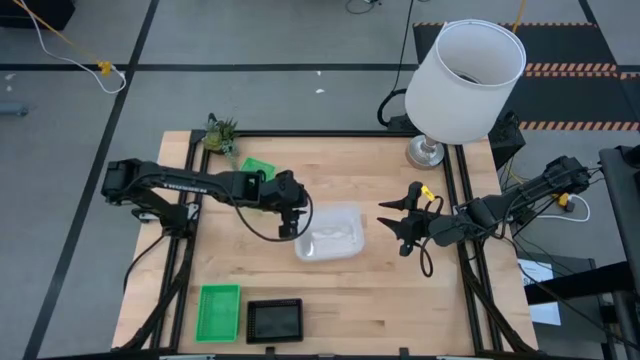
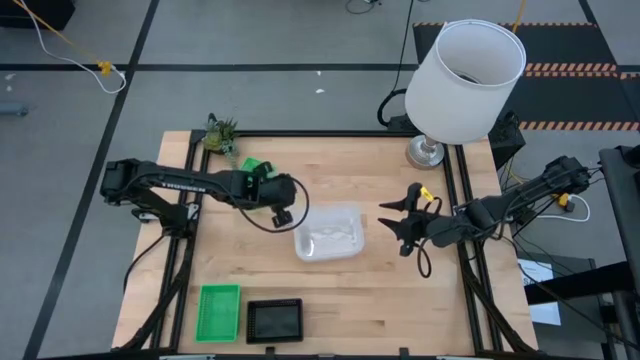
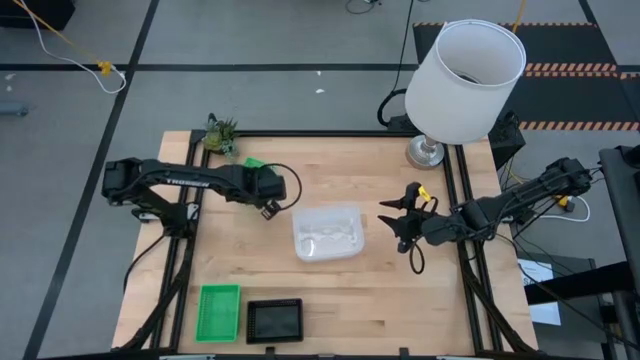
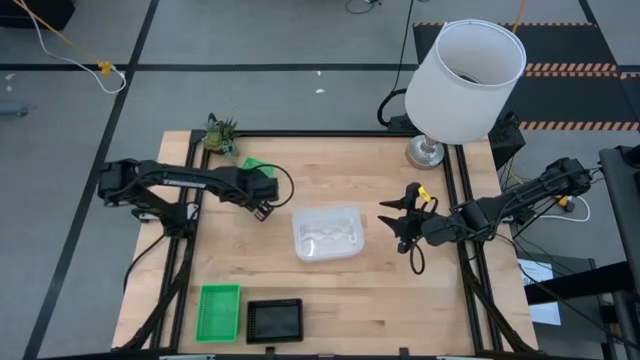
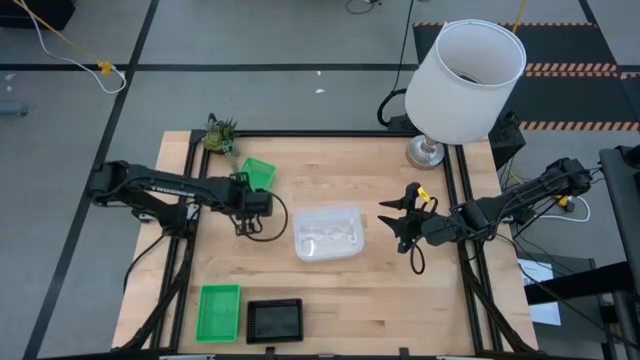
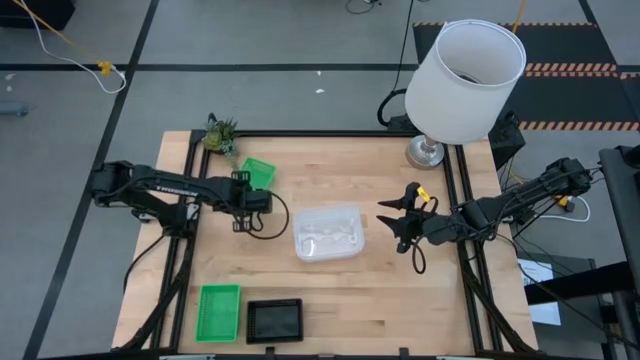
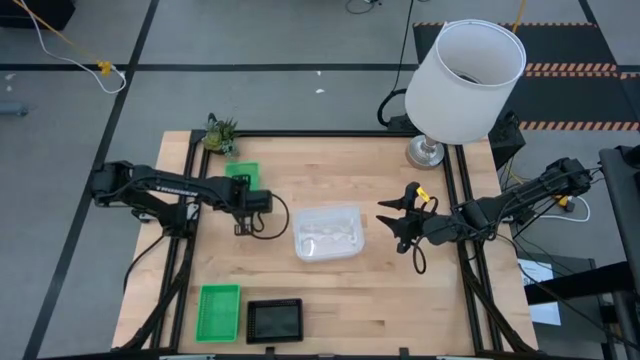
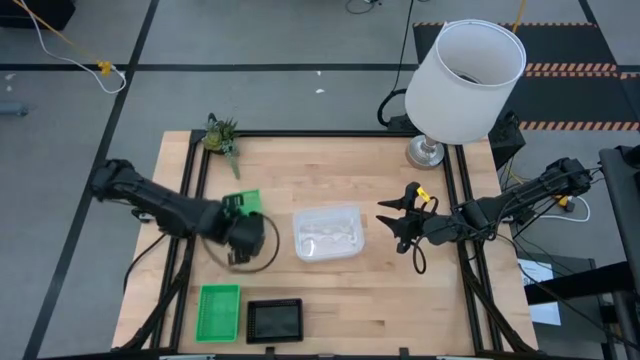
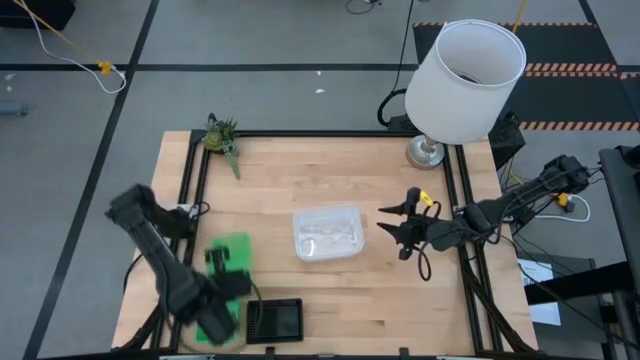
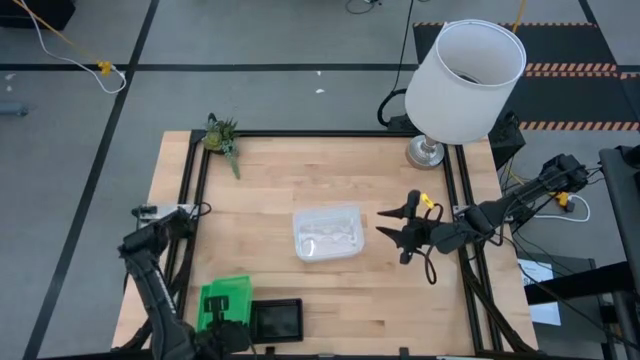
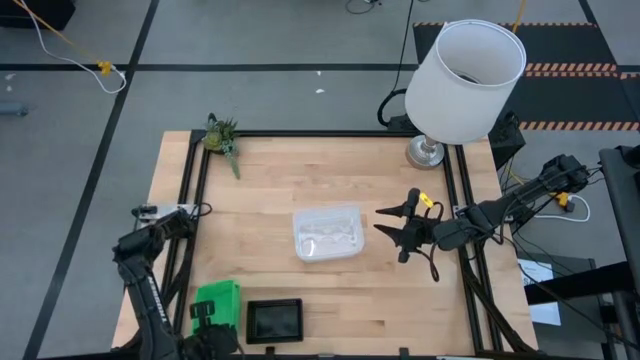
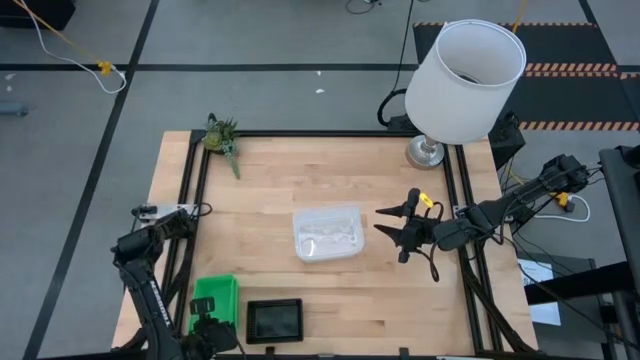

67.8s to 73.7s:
Stack the top green bin on the bottom stacked green bins

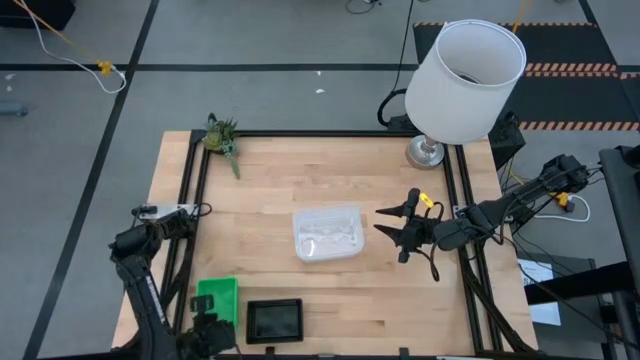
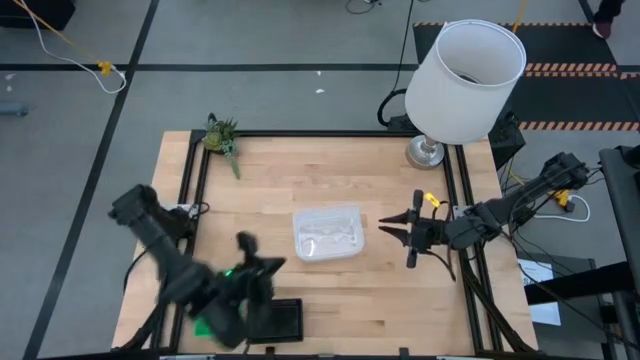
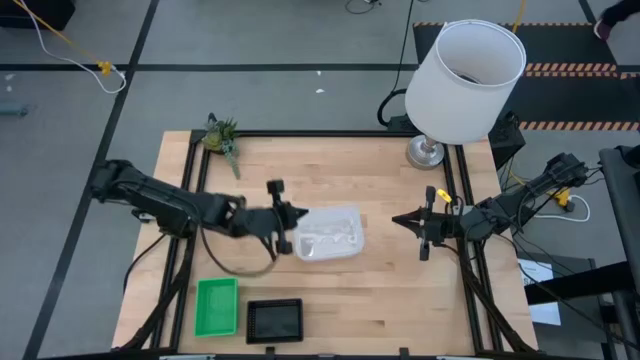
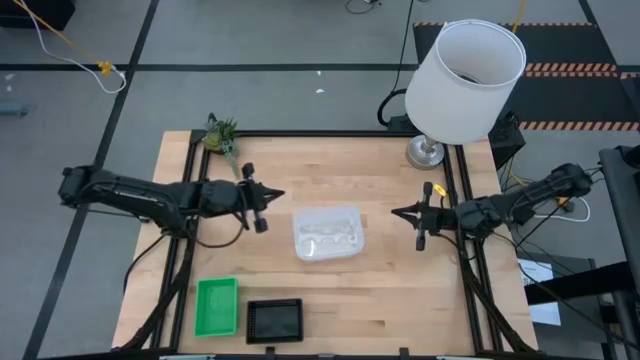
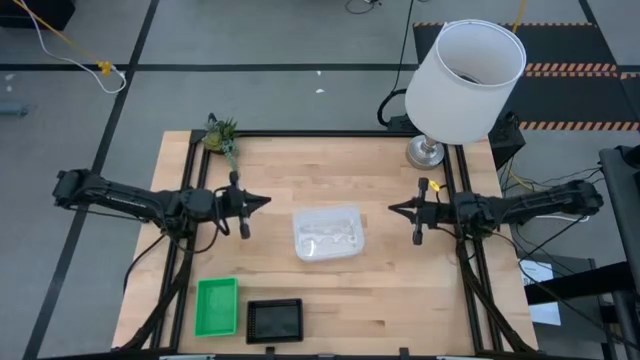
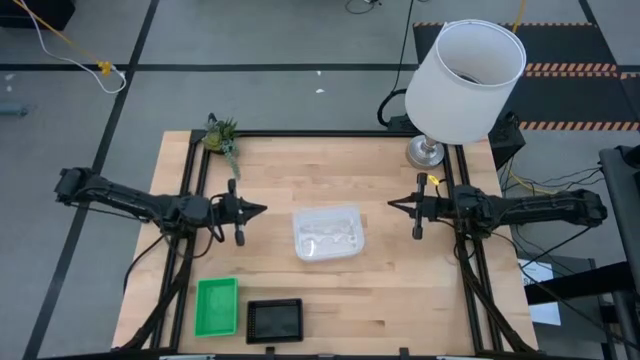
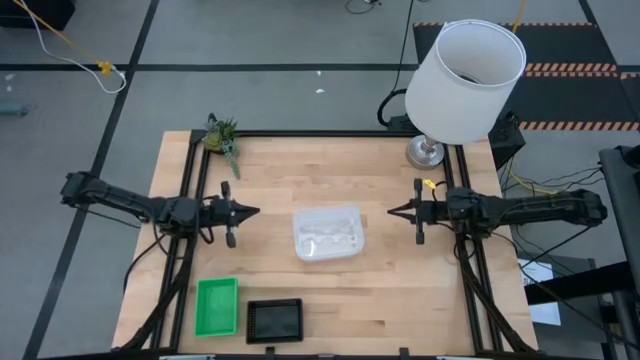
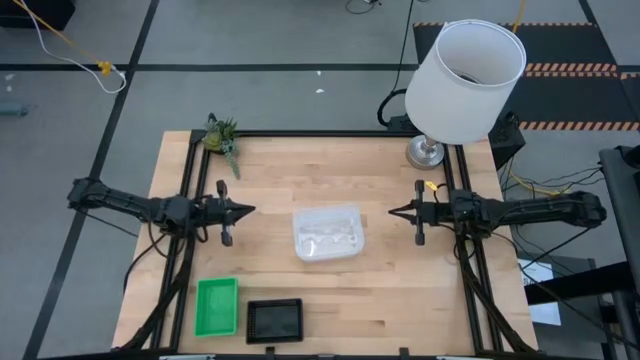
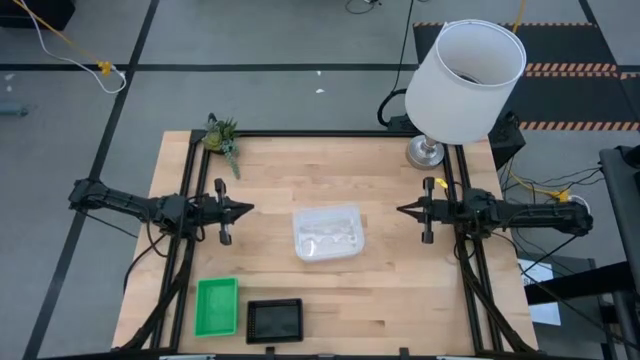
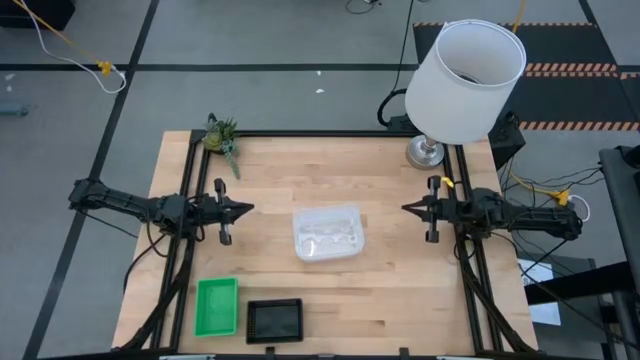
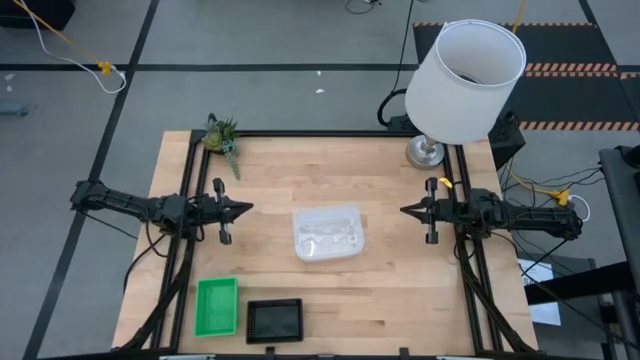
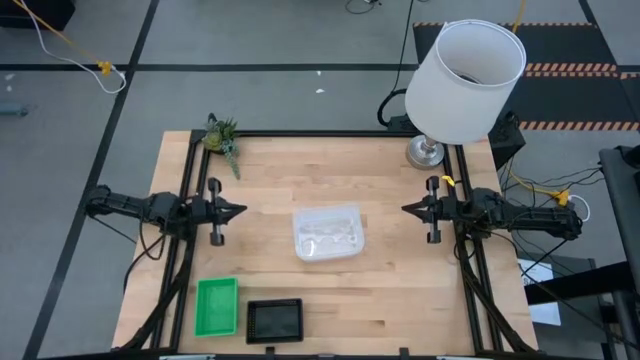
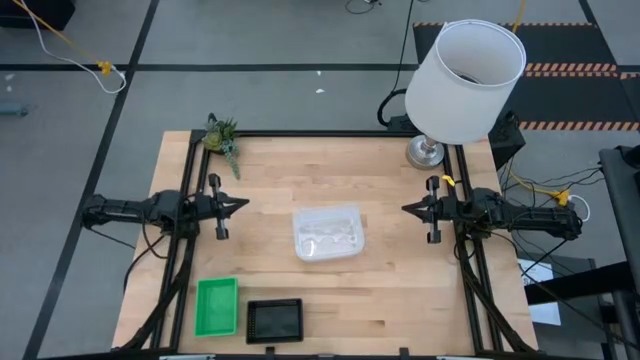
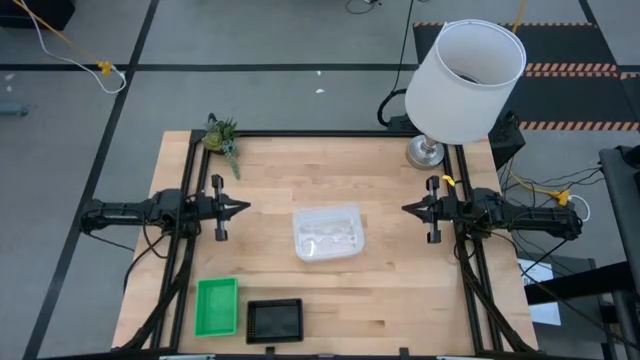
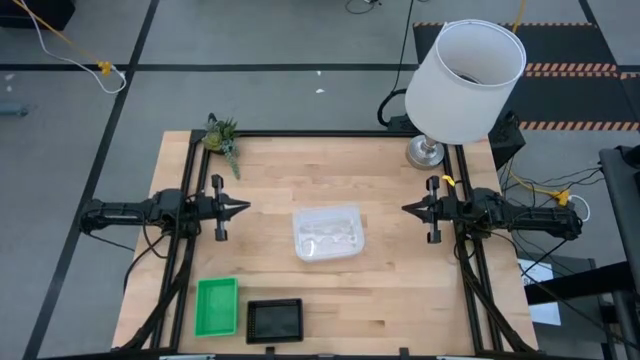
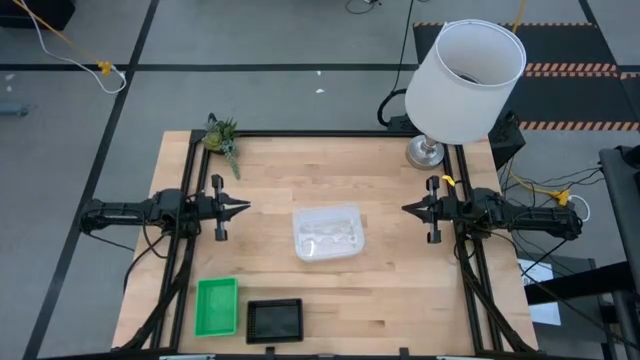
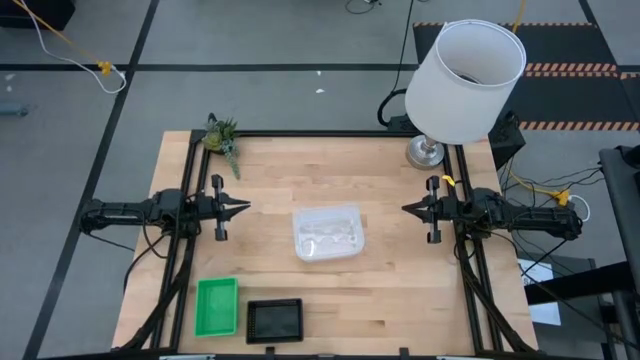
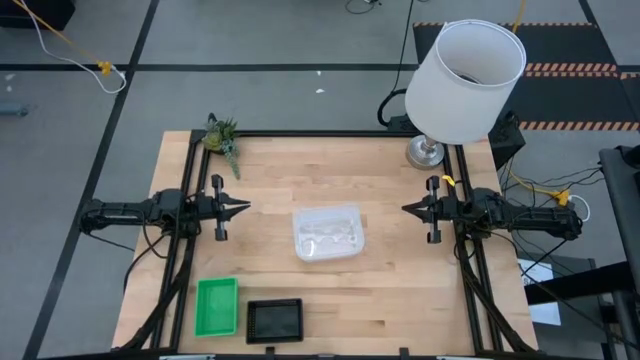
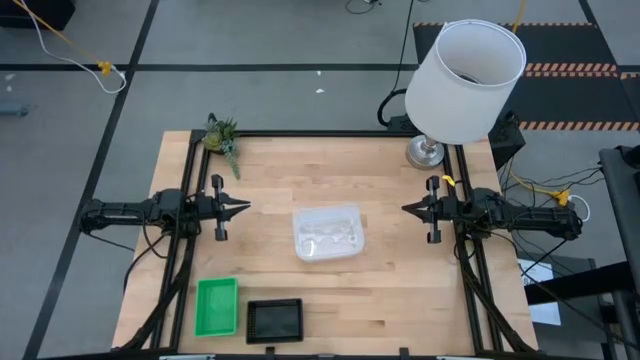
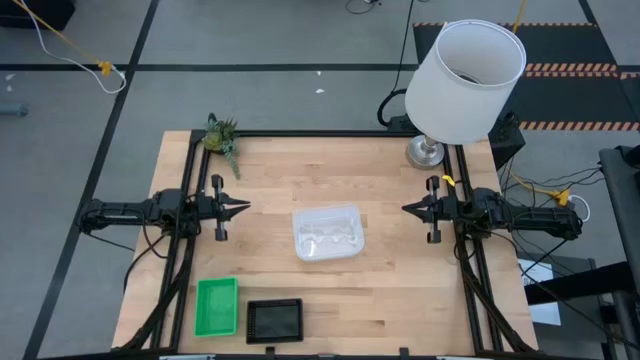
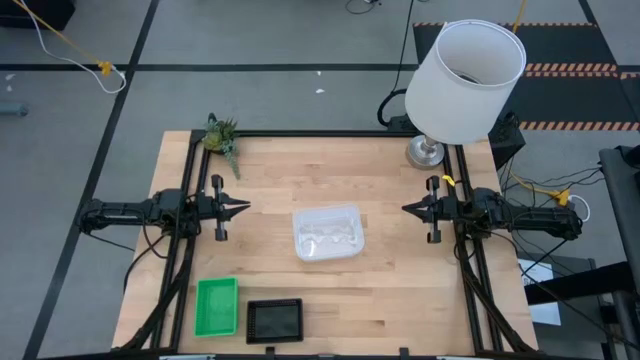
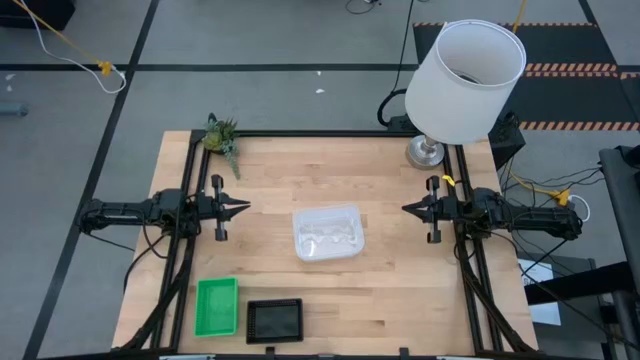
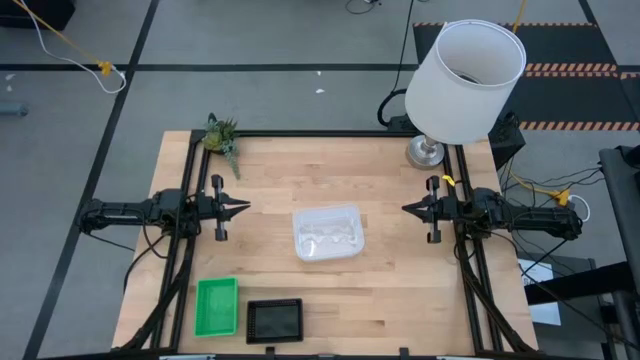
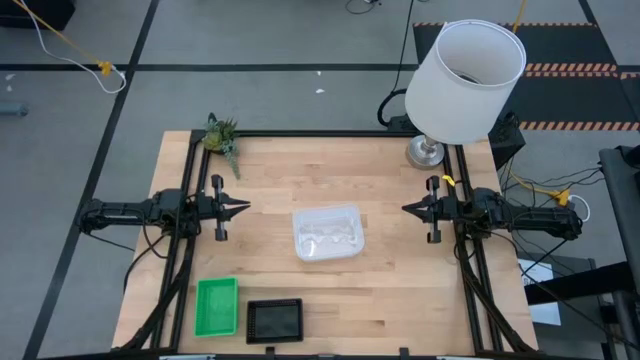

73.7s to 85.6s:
Return to Home Position
